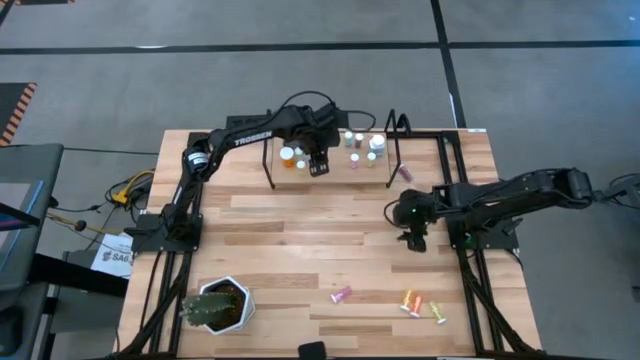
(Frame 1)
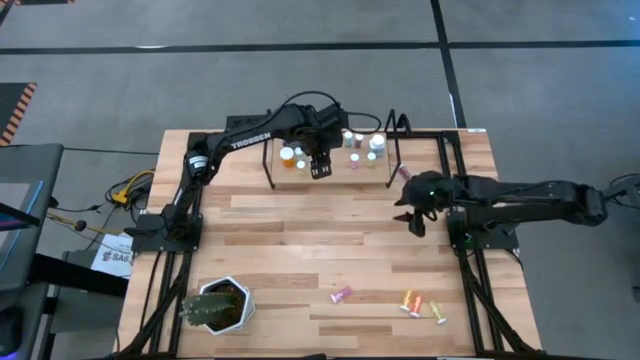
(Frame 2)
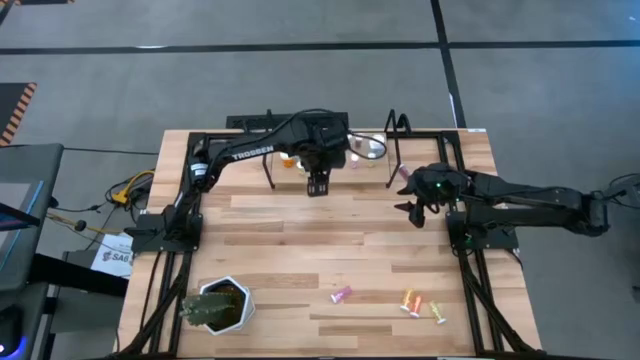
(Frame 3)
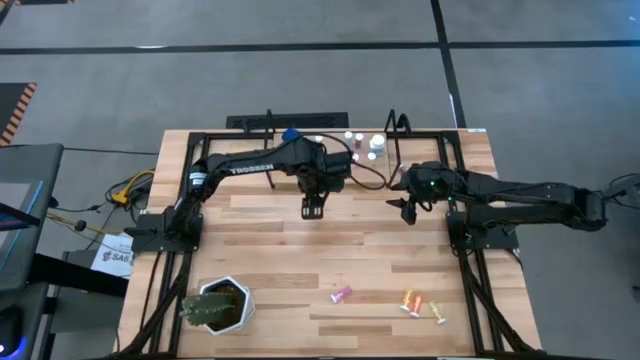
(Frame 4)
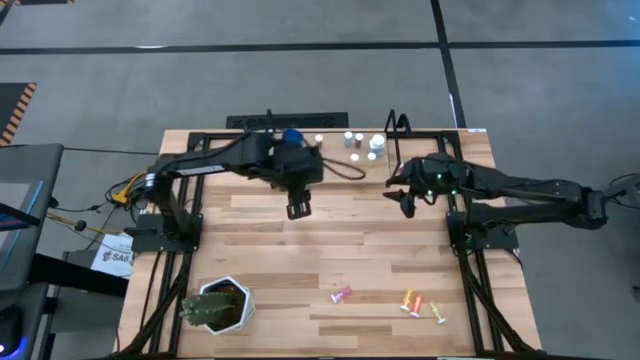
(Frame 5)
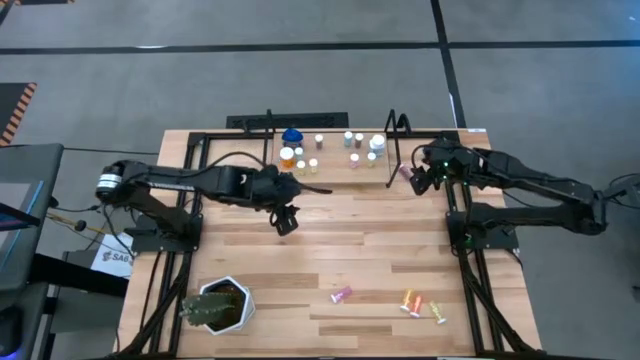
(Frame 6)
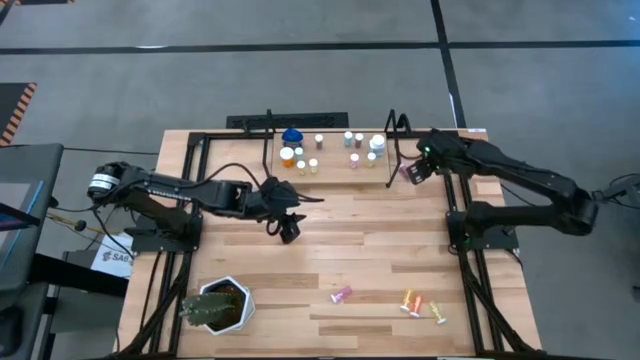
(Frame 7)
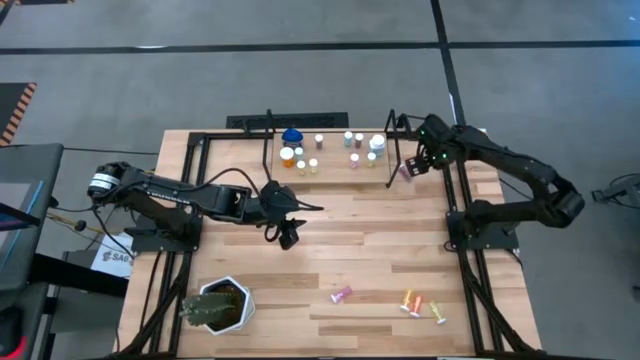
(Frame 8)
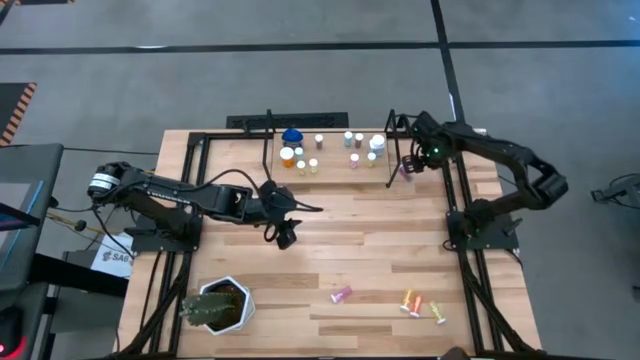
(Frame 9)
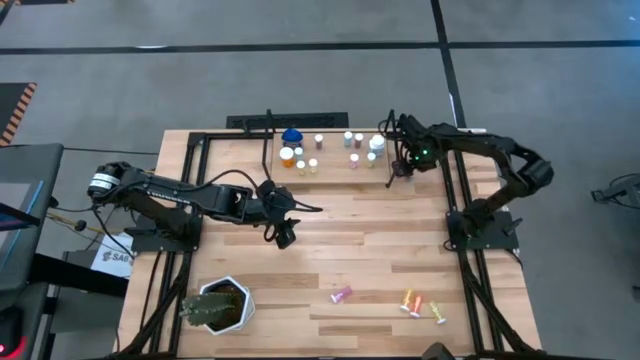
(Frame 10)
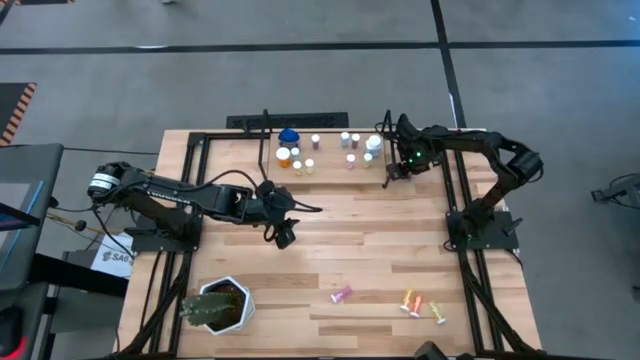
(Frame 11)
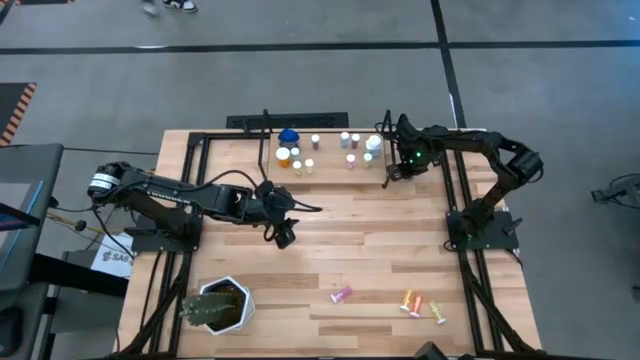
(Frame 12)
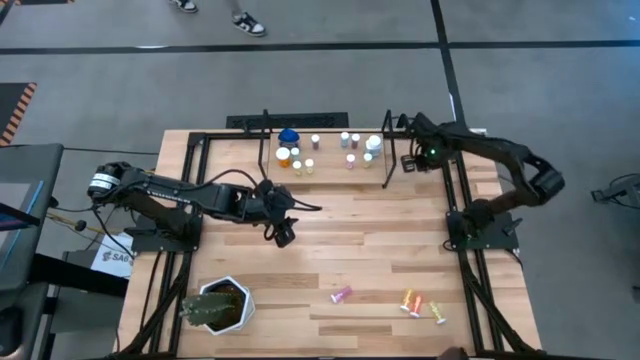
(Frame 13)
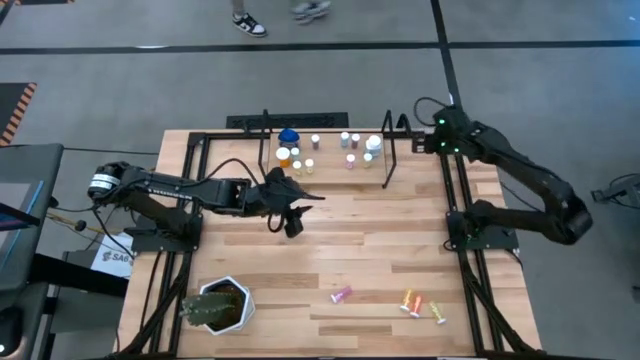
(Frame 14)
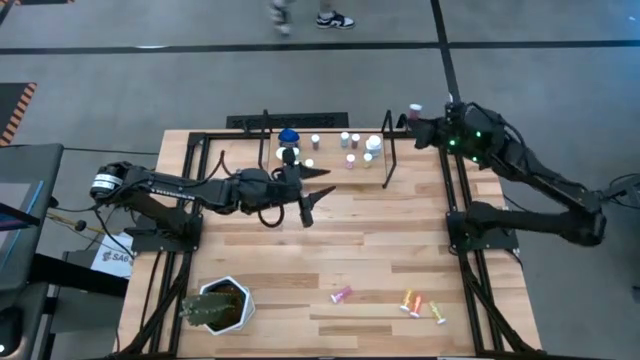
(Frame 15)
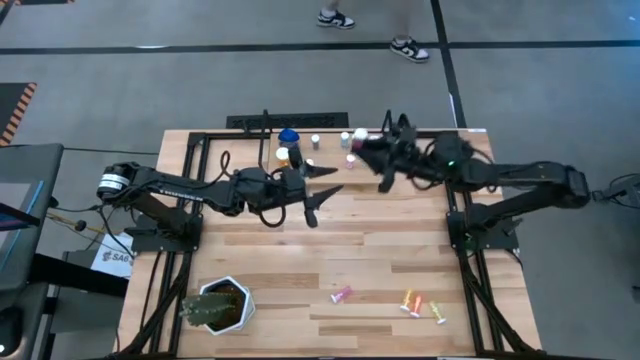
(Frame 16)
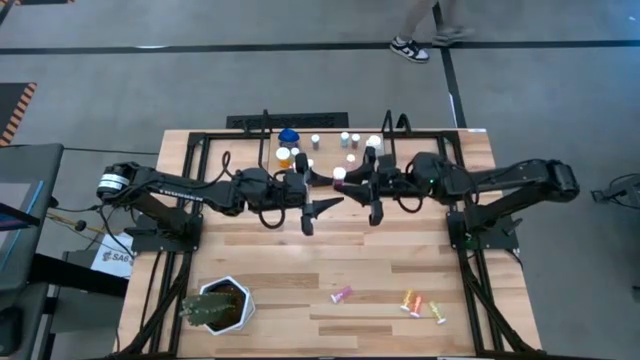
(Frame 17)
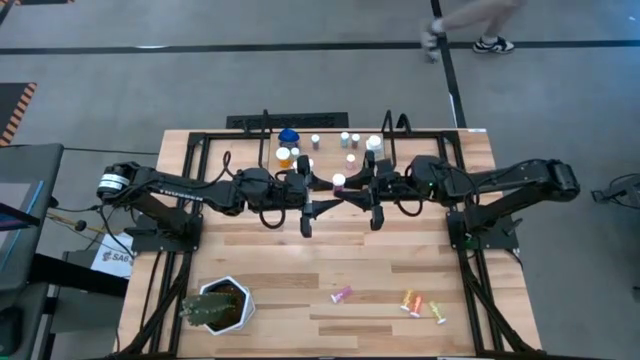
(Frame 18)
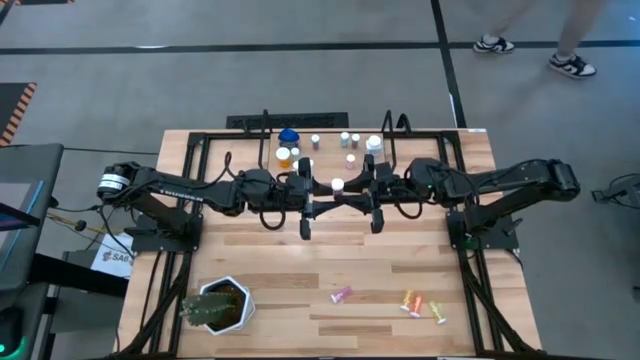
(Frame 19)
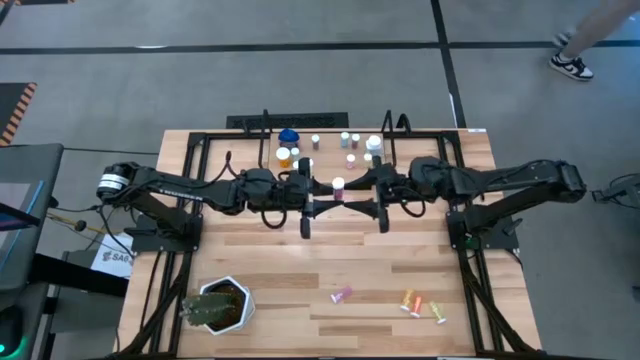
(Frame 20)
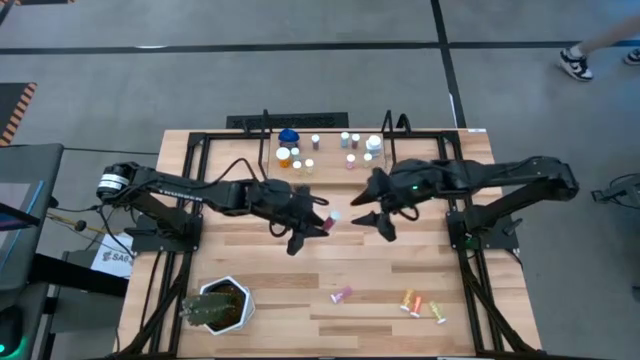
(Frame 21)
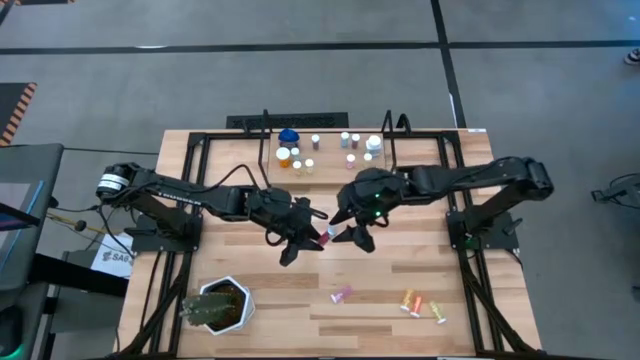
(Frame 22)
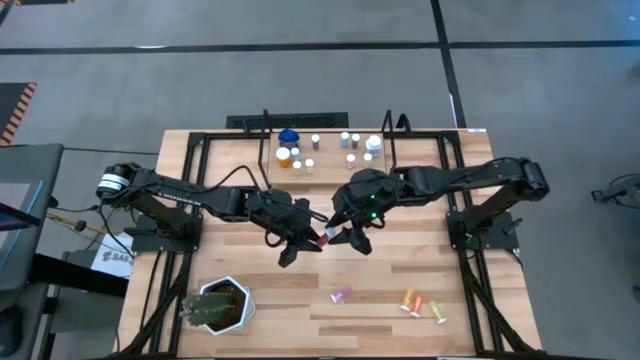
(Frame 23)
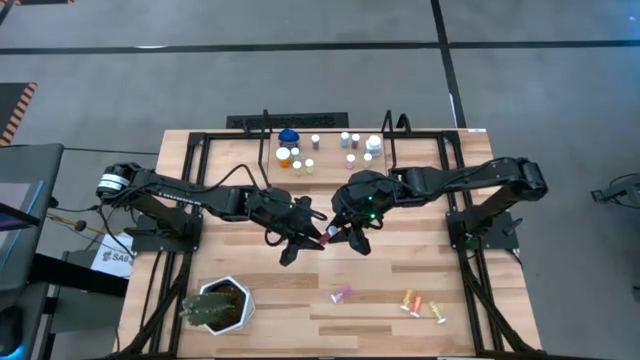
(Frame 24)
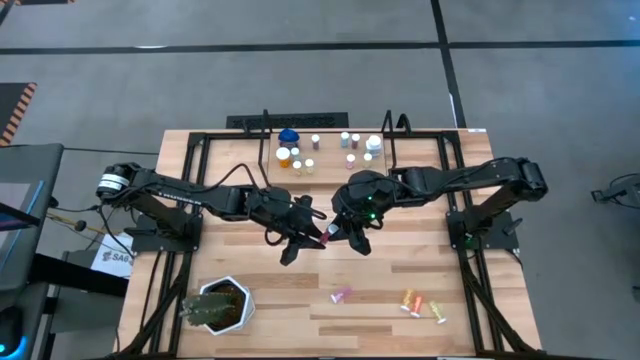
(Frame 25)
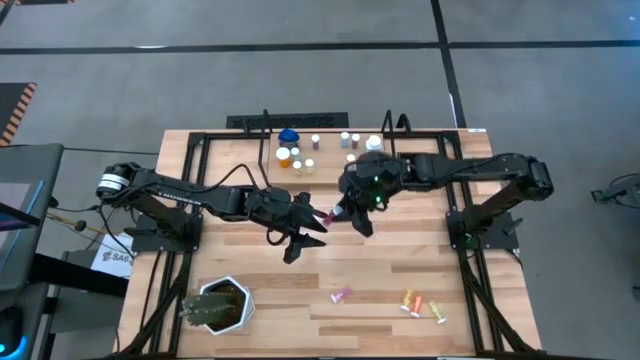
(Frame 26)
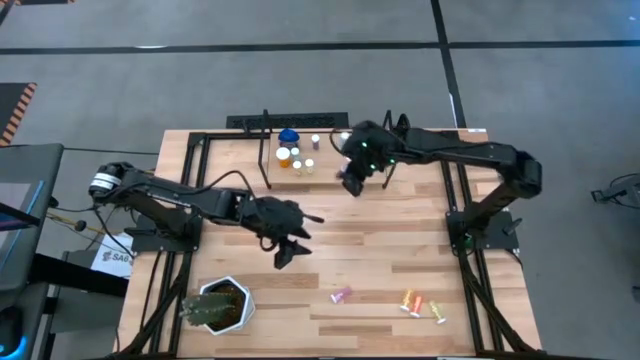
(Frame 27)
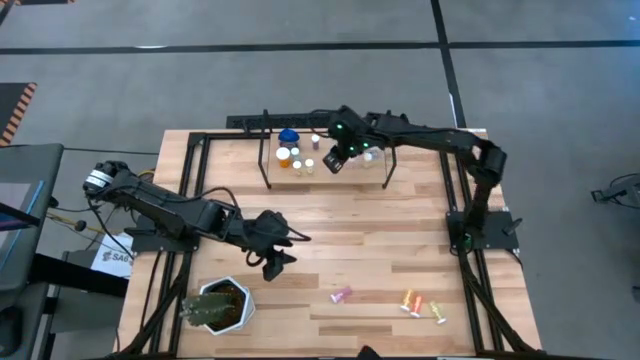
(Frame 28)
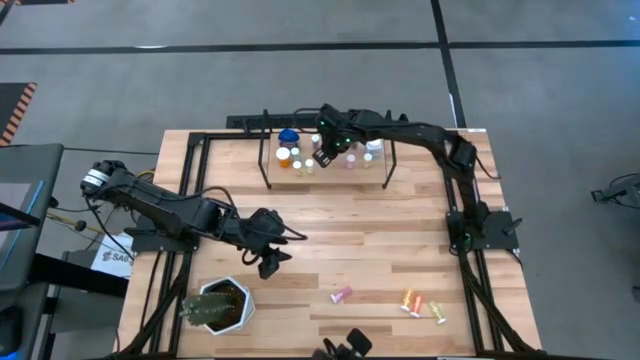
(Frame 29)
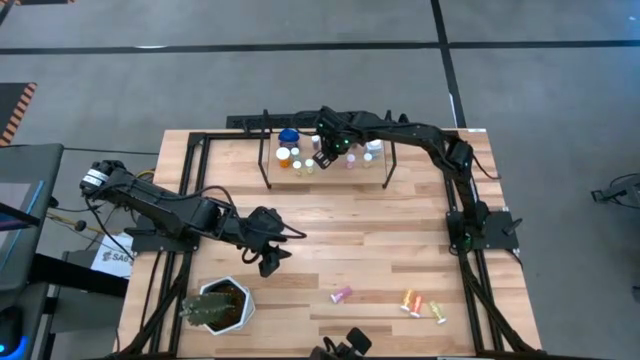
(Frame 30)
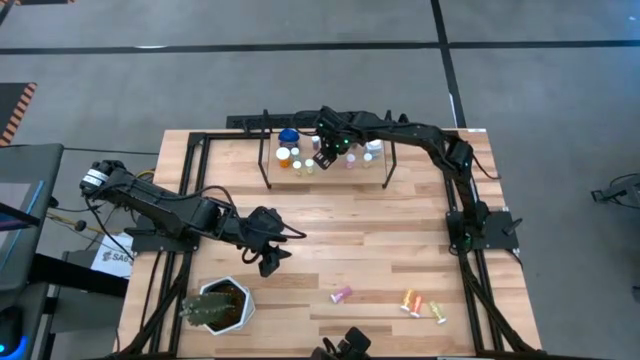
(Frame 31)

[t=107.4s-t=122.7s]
Task: Pick and place medicine bottles onto shelf by color
Put the blue pill bottle on the shelf

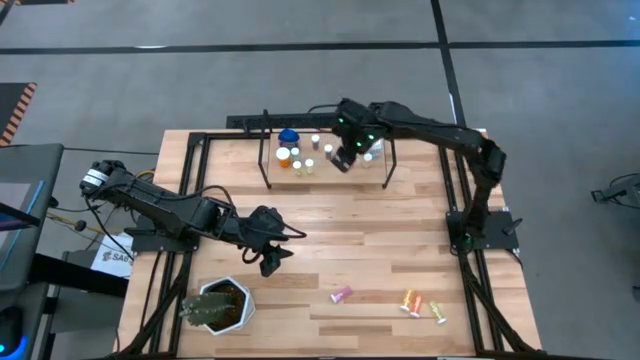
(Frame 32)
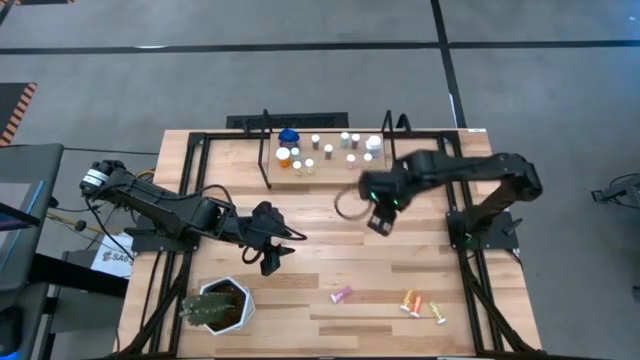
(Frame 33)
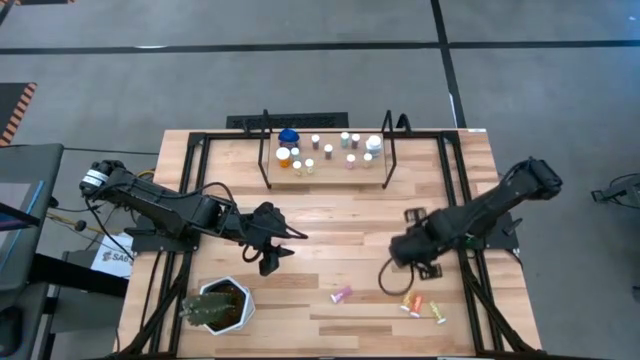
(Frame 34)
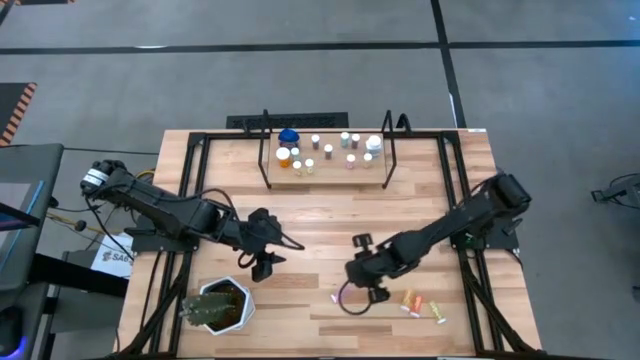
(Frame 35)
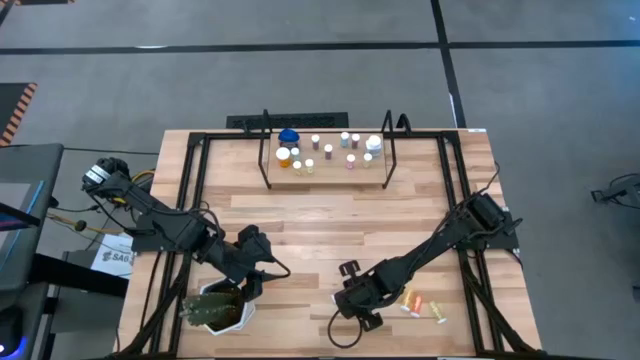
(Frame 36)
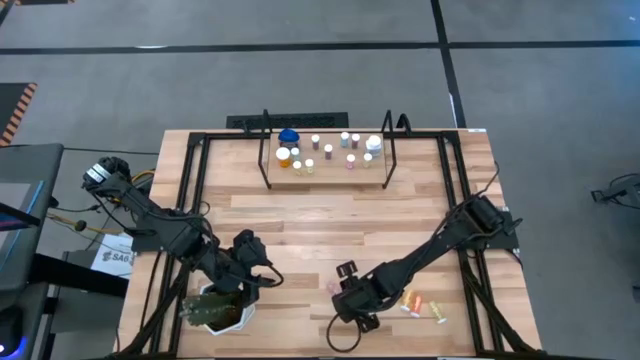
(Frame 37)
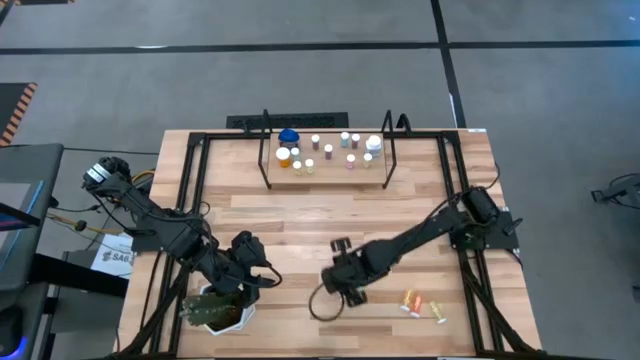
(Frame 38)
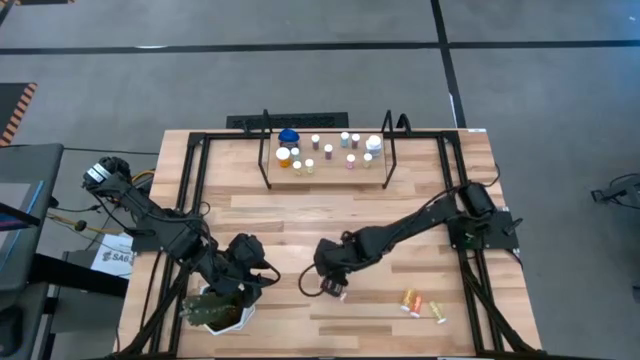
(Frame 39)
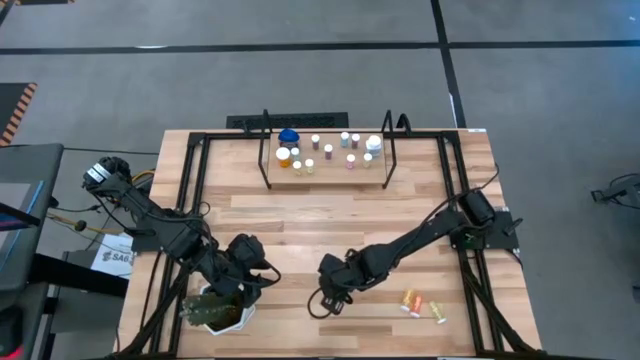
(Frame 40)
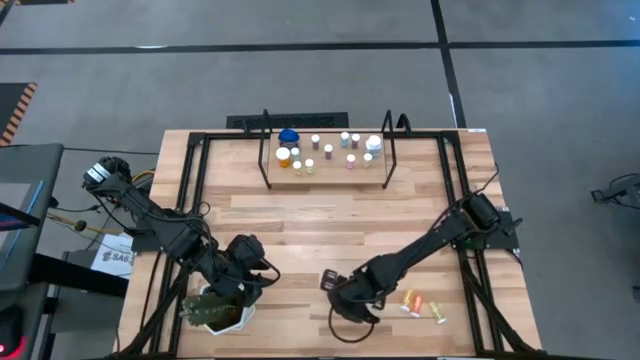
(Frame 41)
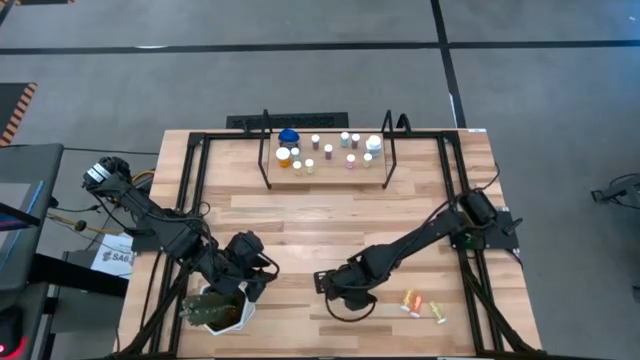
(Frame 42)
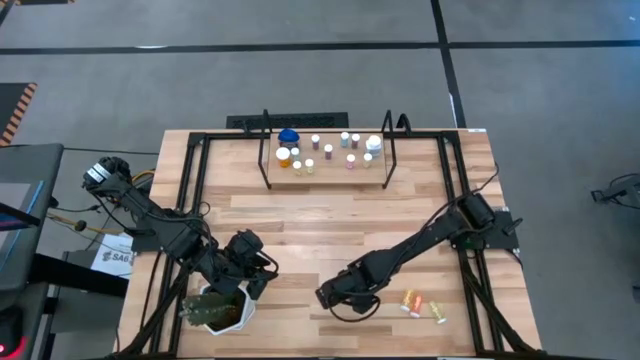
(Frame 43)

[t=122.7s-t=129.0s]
Put the pink pill bottle on the shelf
